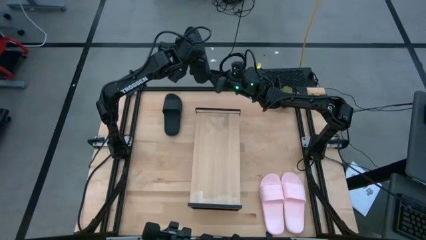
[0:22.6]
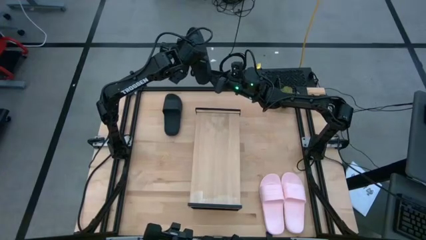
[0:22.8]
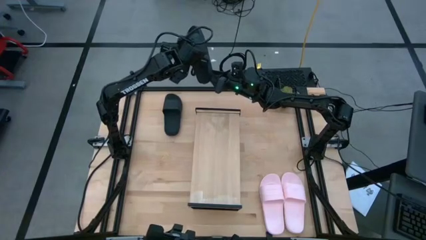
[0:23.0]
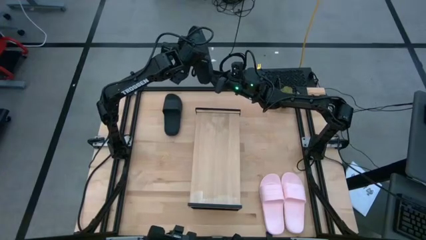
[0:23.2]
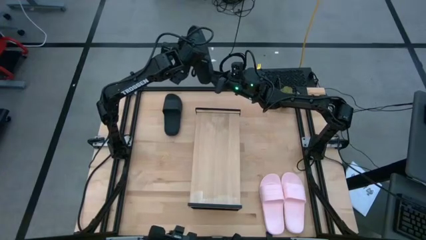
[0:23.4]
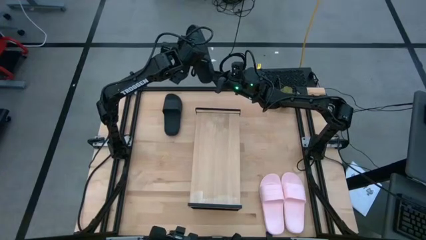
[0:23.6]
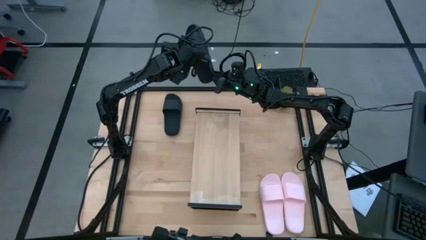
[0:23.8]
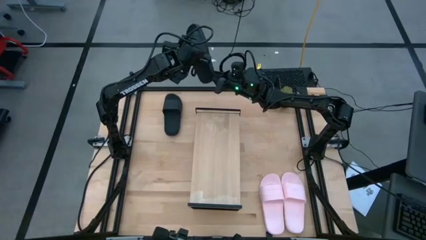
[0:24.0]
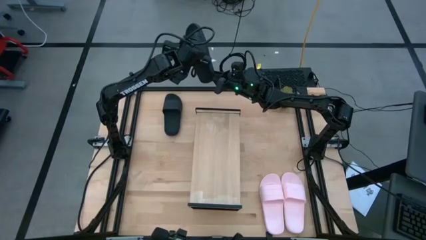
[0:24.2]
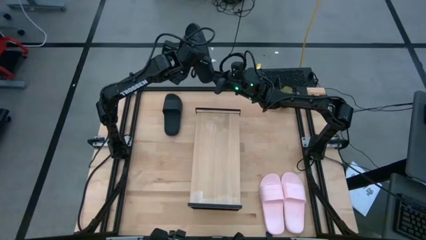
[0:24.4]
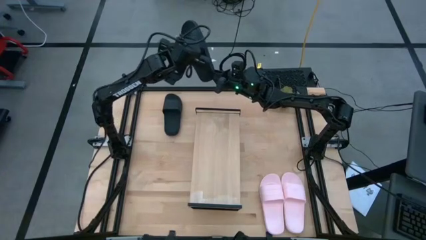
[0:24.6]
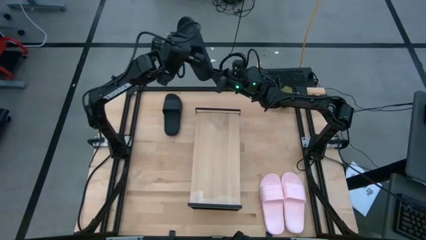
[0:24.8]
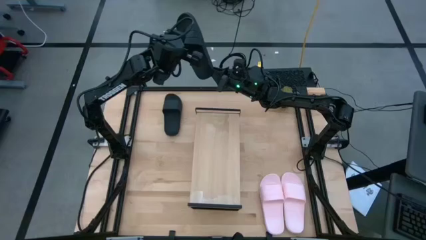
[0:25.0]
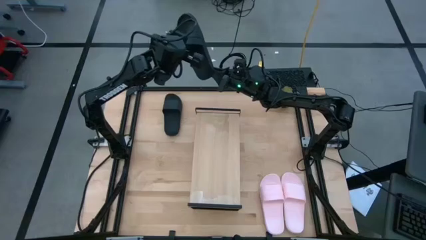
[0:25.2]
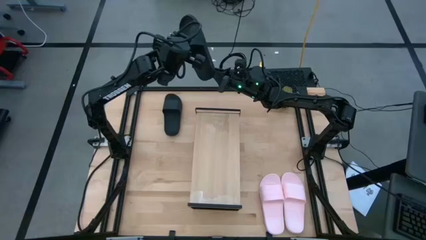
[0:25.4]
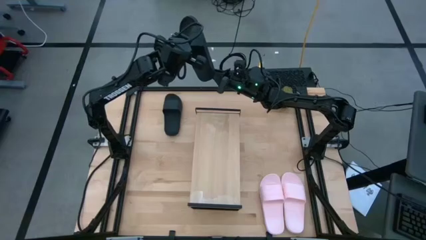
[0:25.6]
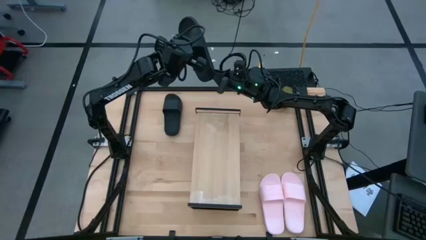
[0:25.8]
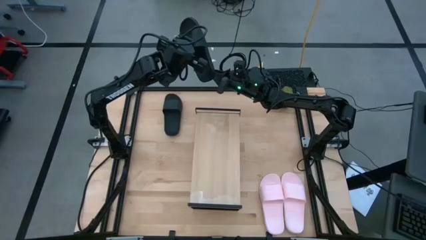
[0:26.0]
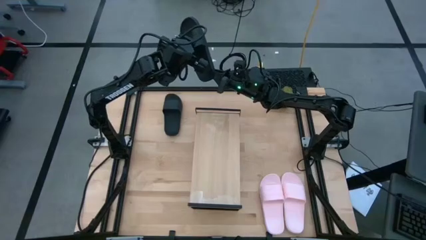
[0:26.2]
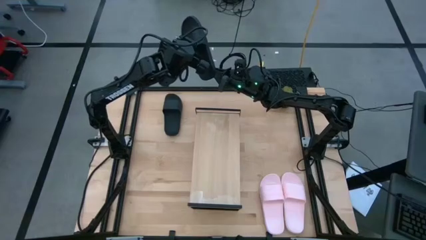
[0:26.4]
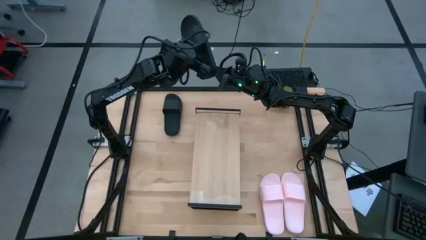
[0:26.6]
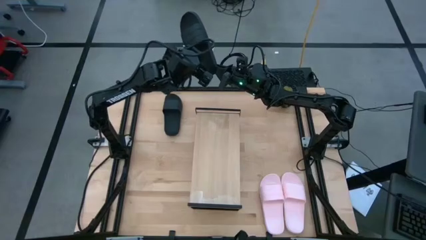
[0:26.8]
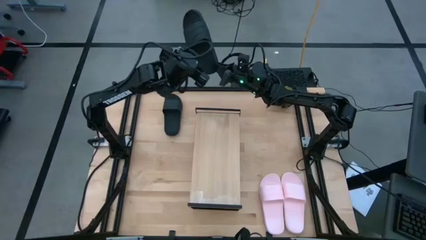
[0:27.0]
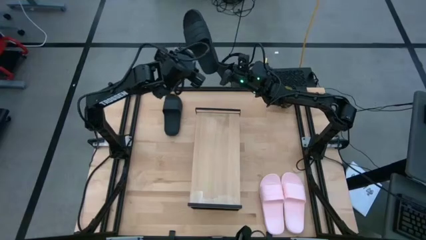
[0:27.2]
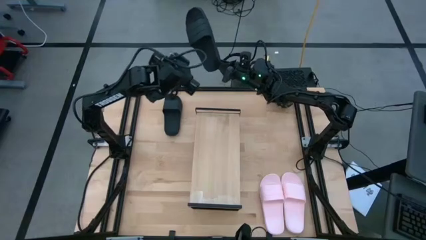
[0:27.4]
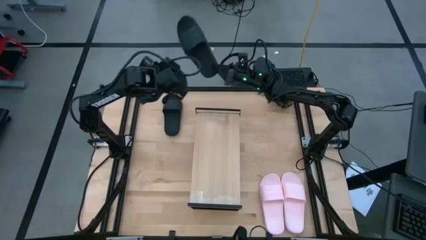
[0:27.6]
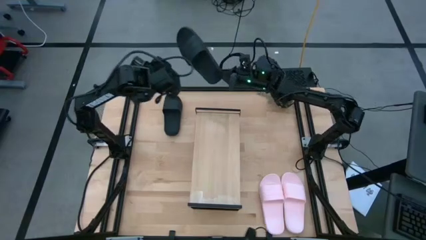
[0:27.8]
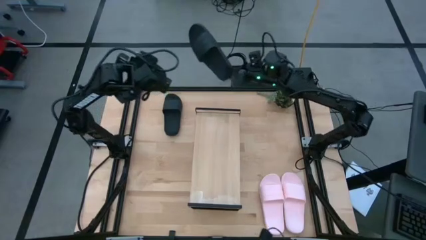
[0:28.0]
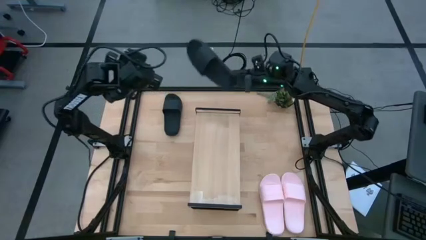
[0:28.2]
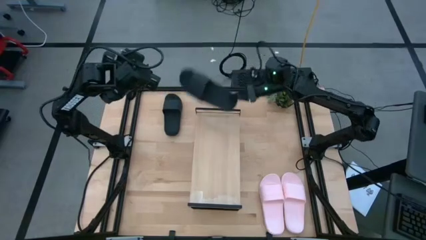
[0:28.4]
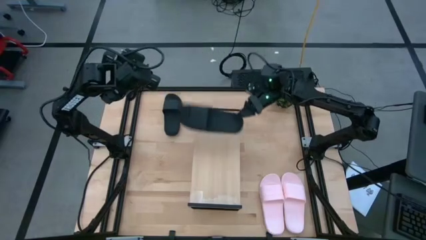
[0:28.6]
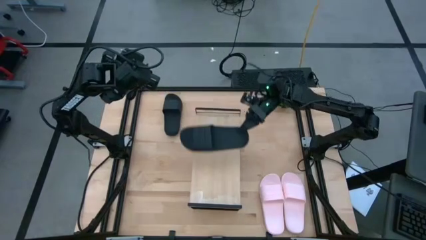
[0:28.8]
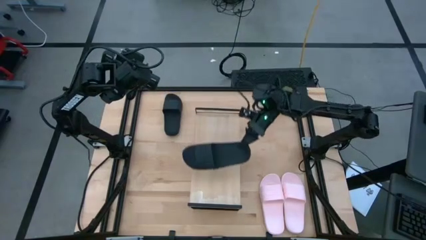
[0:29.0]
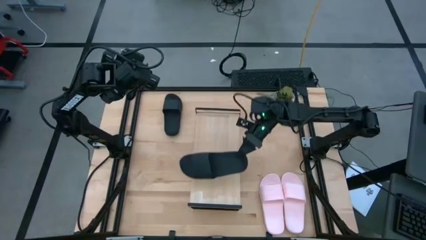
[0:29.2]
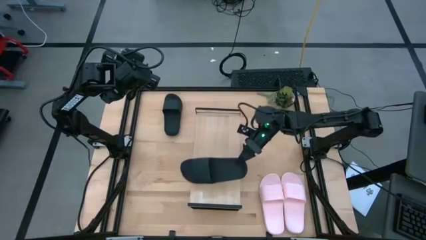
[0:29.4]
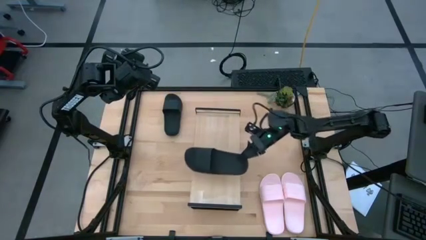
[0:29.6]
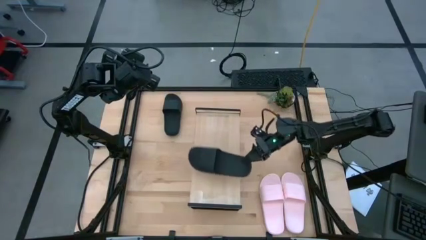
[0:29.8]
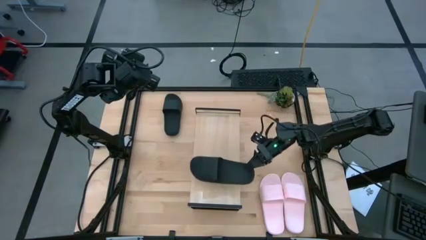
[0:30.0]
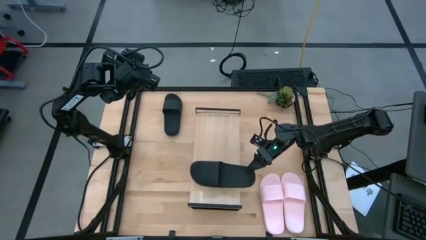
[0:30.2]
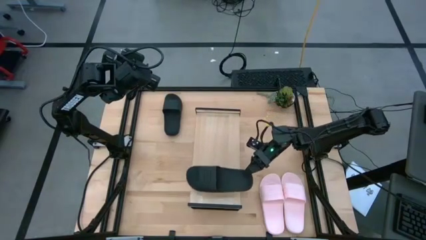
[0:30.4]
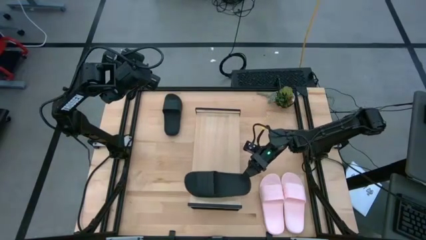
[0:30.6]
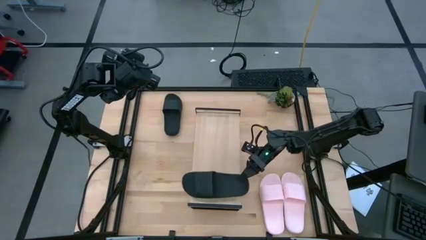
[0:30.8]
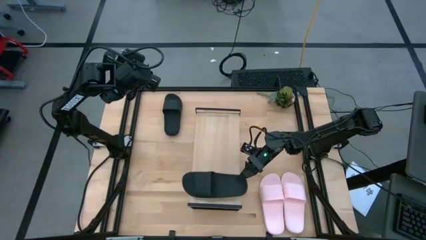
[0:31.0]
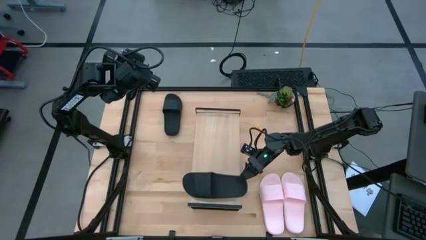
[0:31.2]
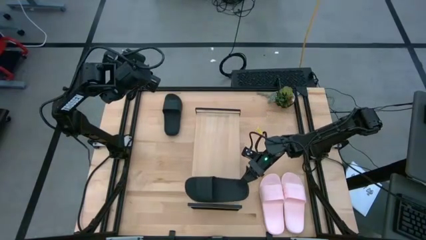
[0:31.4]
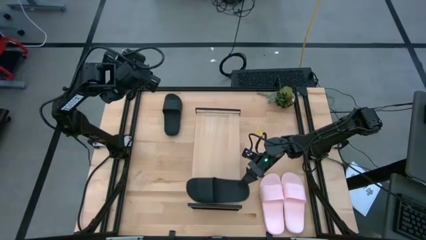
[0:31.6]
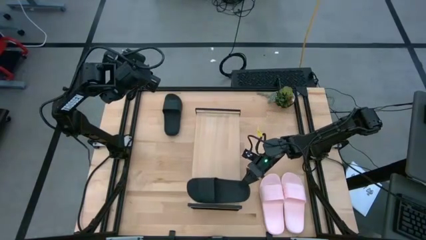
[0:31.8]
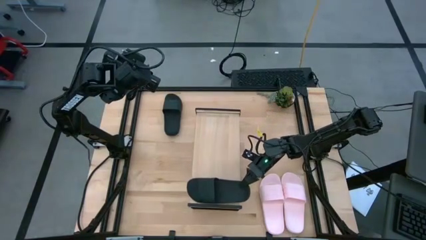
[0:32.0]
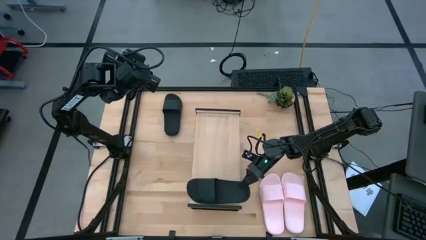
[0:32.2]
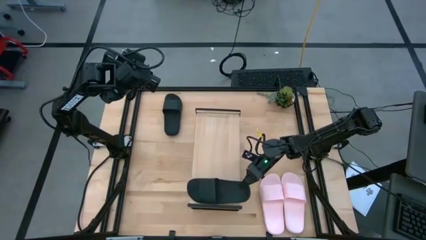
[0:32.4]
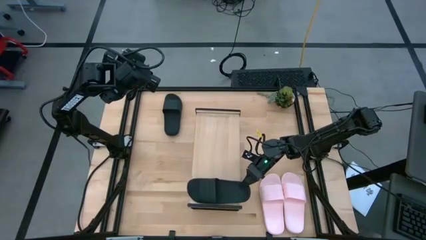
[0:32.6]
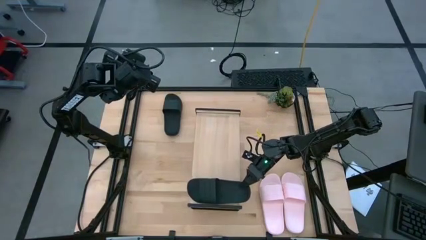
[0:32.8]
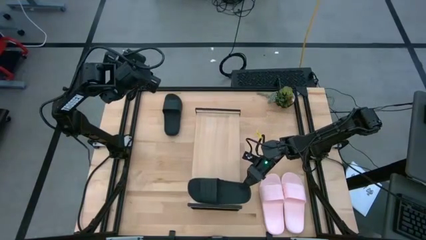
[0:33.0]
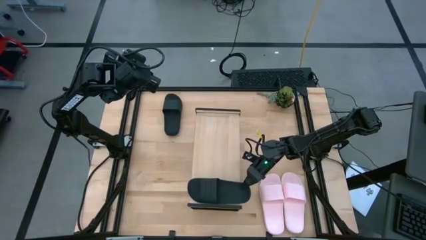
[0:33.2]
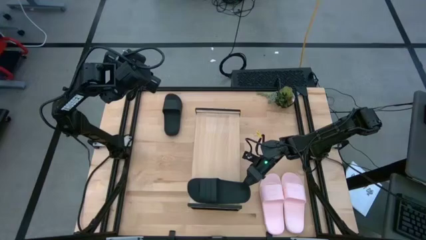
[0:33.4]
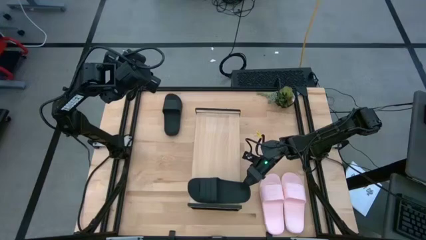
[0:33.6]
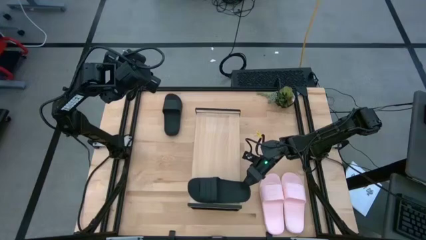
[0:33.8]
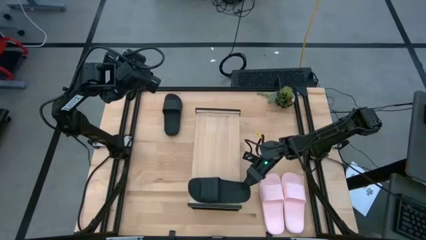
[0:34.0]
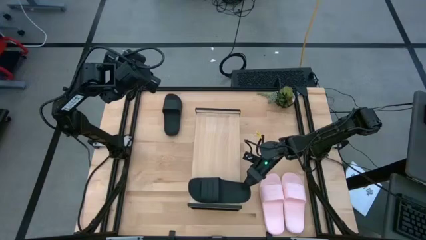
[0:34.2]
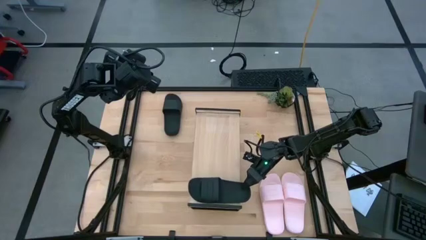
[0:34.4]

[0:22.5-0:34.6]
Task: Pick and place slides into the shelf
Put the left black slipper on the shelf

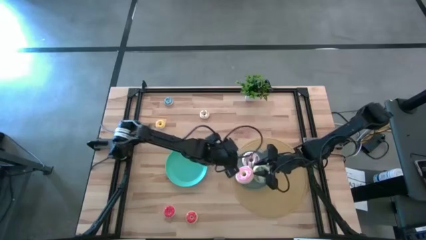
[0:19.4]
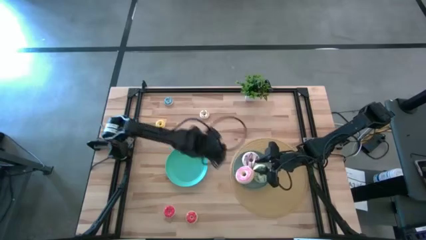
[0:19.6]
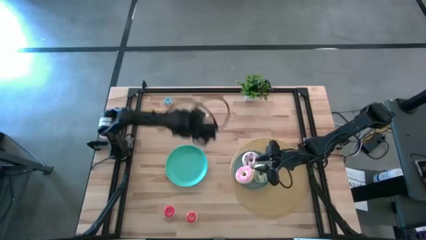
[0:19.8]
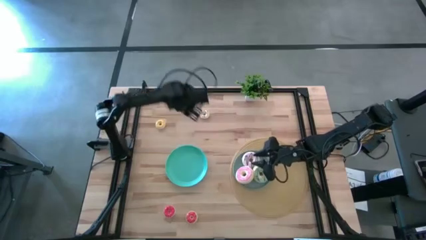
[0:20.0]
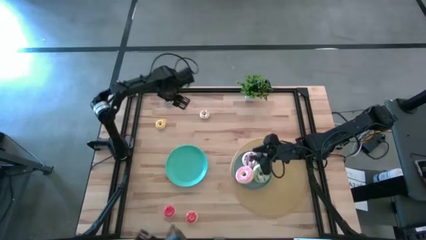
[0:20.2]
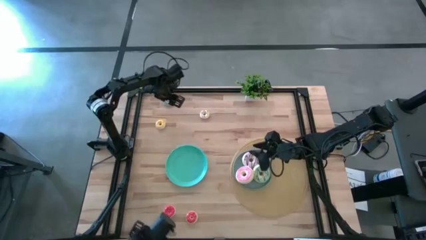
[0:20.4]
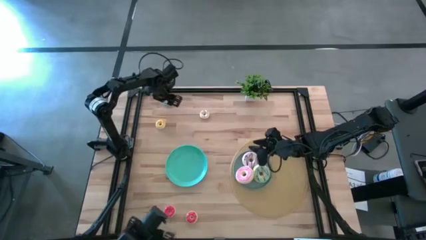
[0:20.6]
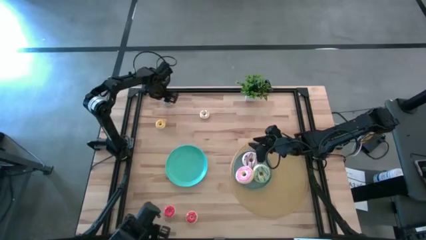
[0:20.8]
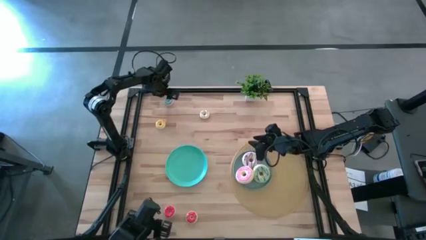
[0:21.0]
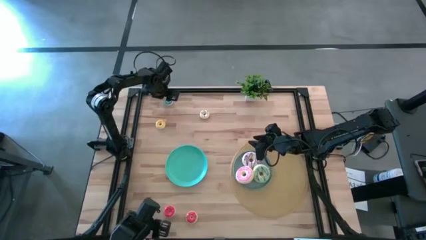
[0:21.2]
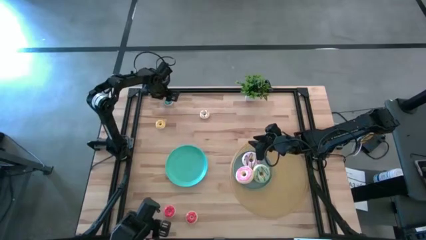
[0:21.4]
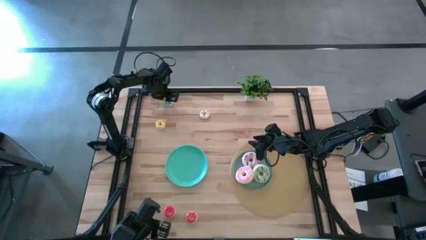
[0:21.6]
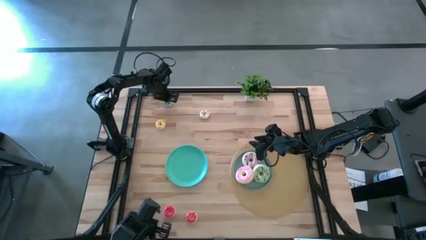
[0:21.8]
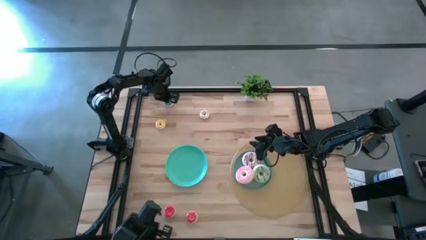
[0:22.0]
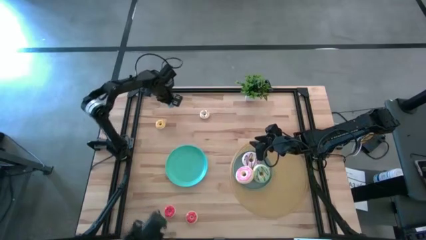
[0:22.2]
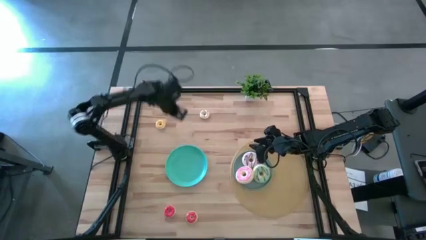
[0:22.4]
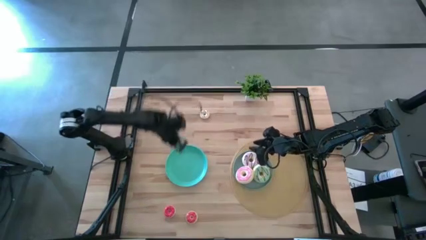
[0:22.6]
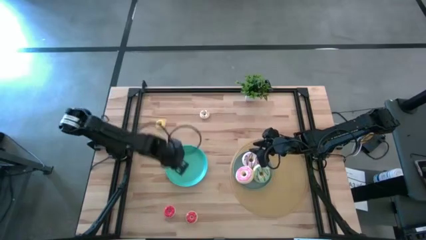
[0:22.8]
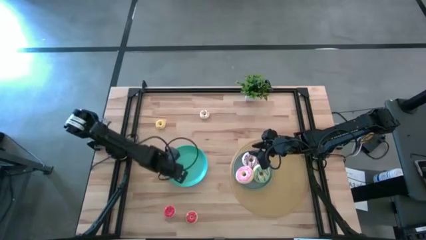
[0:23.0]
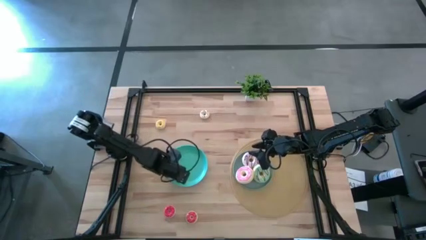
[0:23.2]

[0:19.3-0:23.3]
Task: Pick & Place donuts
Put the small blue donut on the blue plate

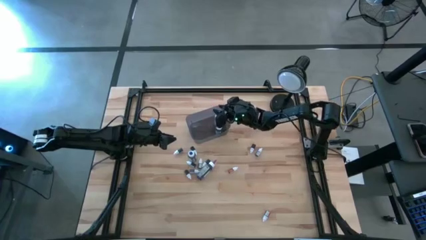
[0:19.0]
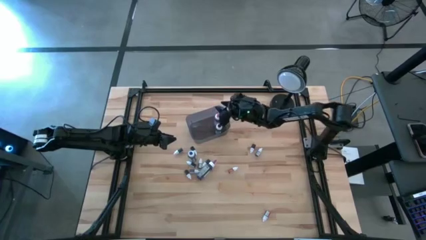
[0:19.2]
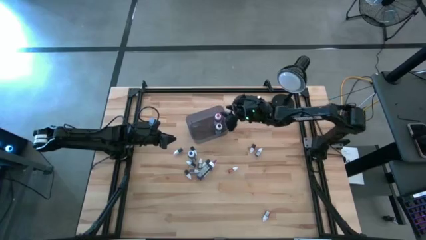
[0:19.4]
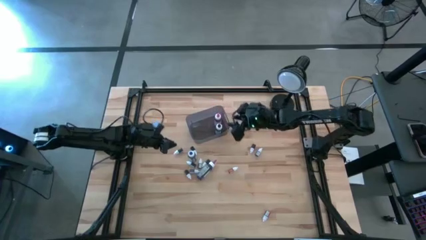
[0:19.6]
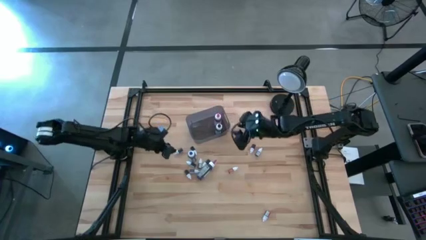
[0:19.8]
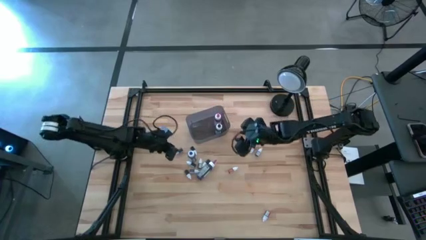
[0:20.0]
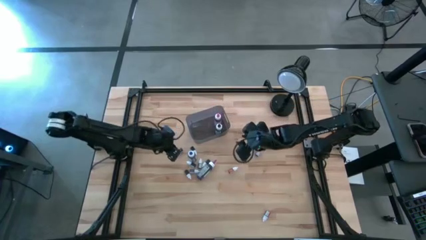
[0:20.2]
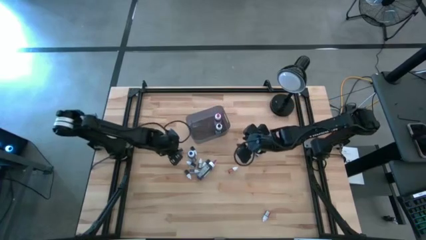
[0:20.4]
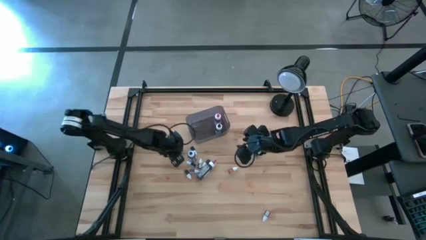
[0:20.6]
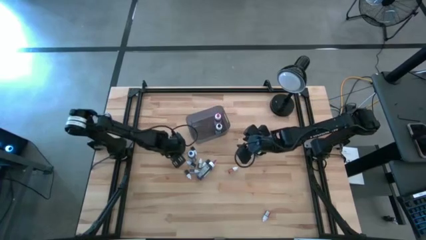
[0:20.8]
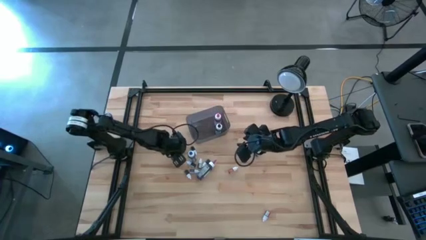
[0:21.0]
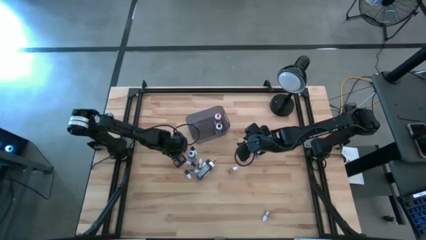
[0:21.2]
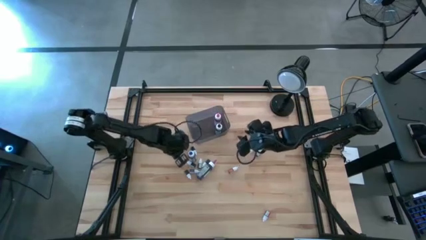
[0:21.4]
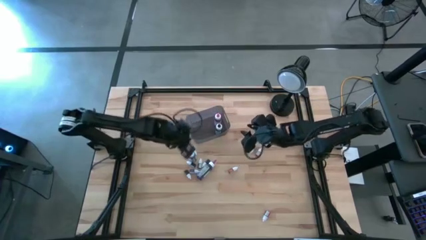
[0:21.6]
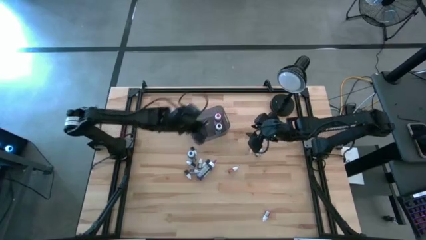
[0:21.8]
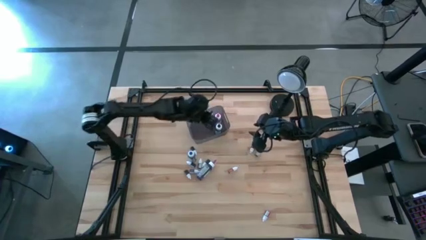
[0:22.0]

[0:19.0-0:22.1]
Task: Pick & Place food coloring
Put the small black food coloring bottle into the gray bin
